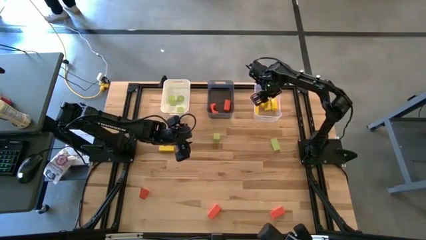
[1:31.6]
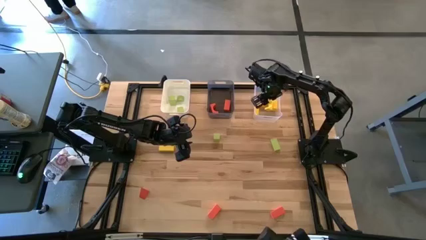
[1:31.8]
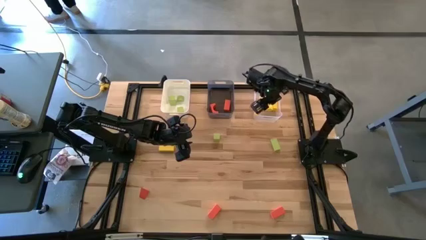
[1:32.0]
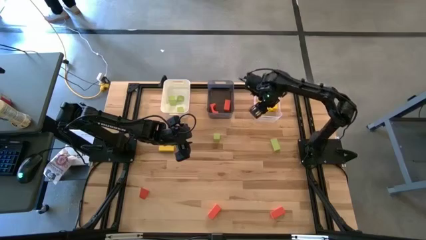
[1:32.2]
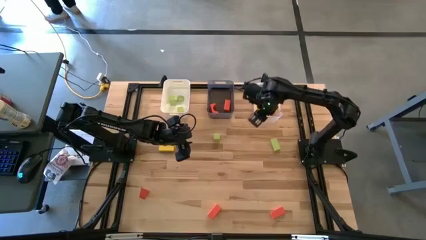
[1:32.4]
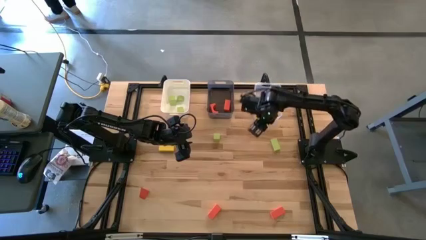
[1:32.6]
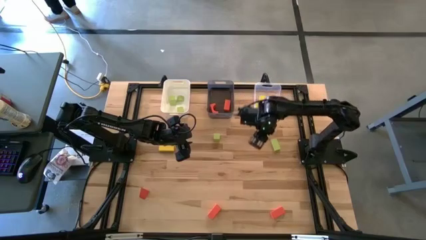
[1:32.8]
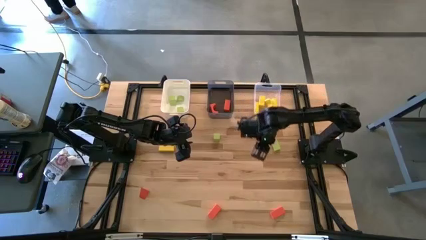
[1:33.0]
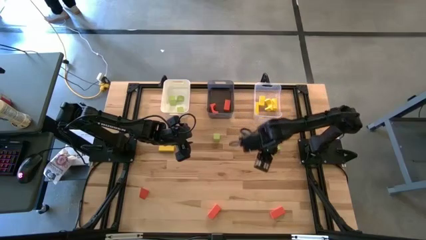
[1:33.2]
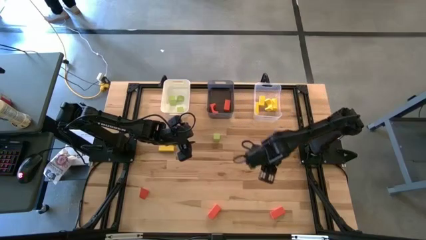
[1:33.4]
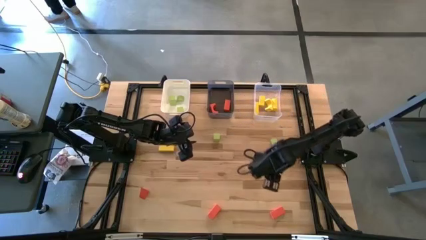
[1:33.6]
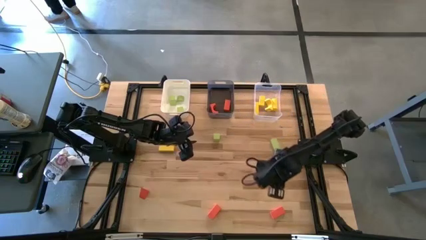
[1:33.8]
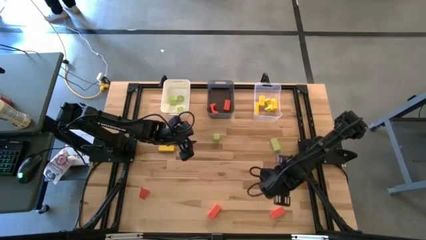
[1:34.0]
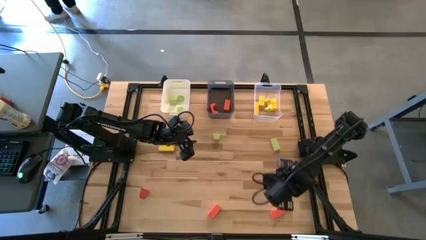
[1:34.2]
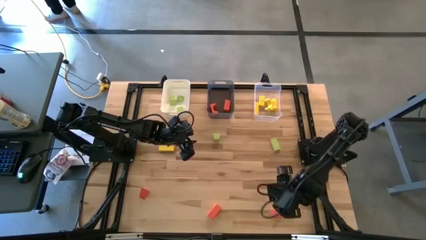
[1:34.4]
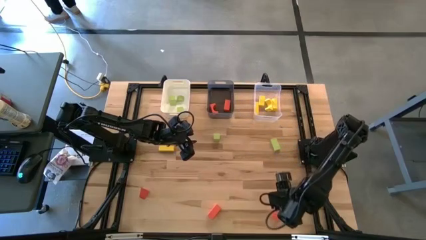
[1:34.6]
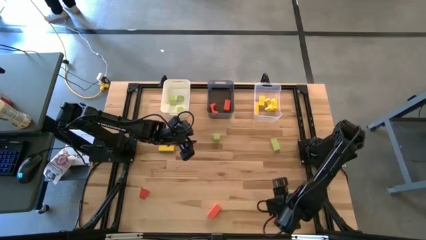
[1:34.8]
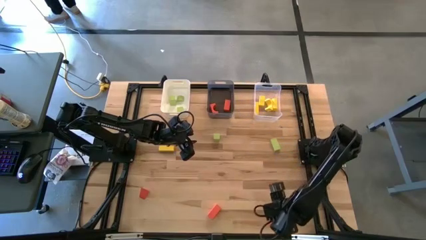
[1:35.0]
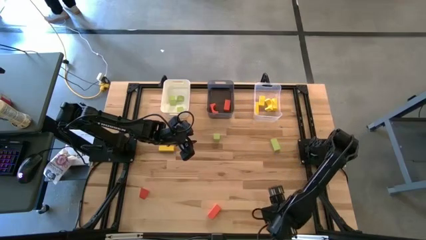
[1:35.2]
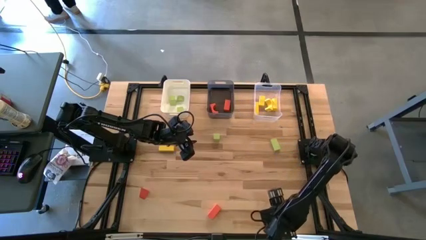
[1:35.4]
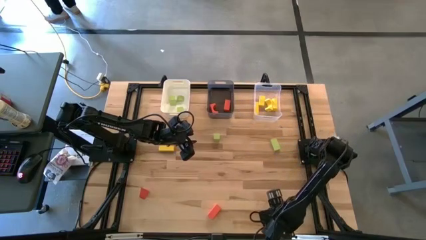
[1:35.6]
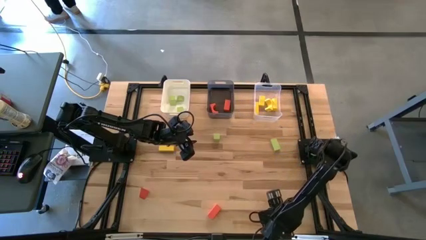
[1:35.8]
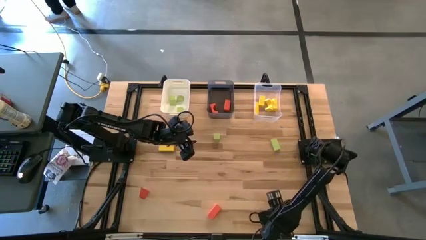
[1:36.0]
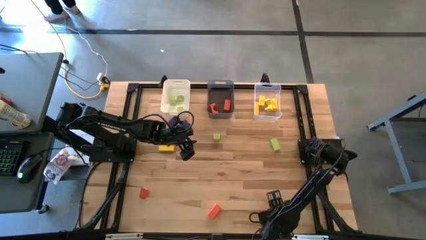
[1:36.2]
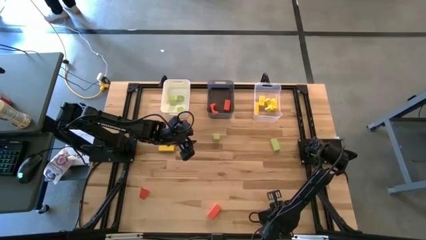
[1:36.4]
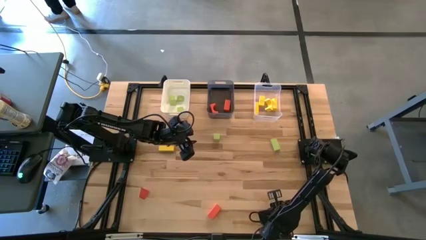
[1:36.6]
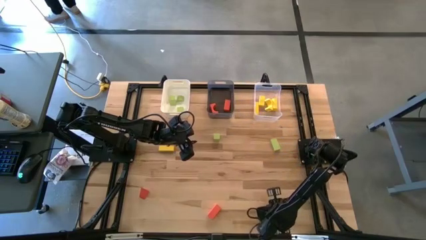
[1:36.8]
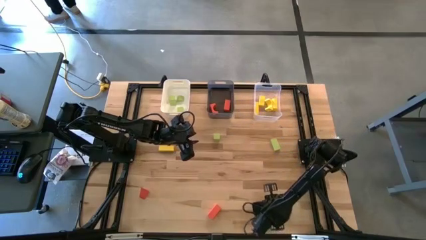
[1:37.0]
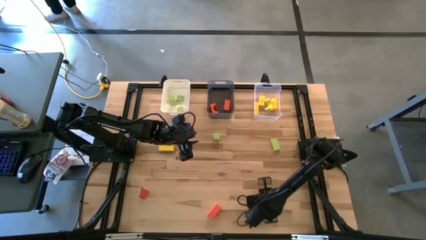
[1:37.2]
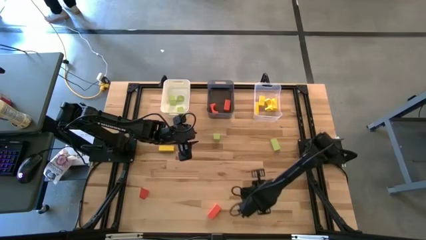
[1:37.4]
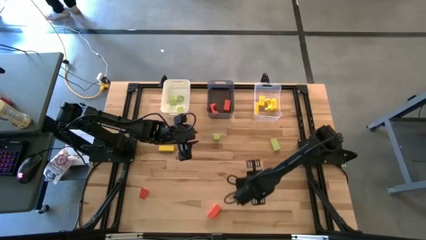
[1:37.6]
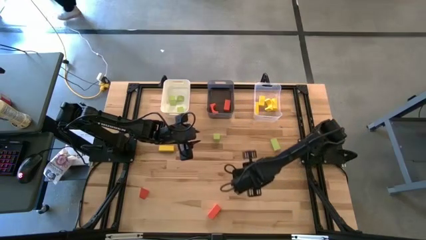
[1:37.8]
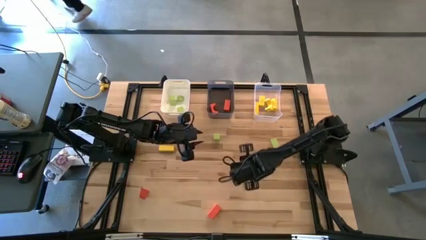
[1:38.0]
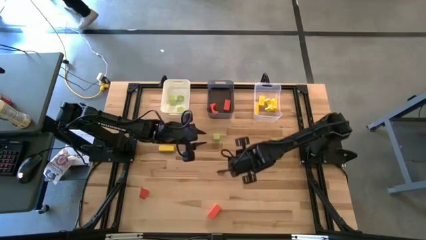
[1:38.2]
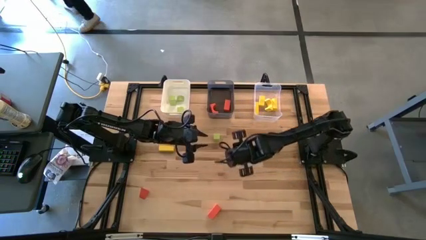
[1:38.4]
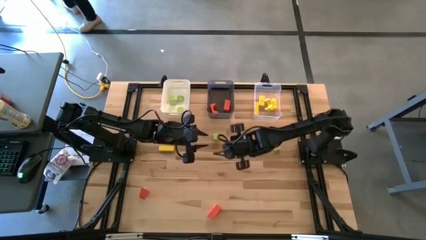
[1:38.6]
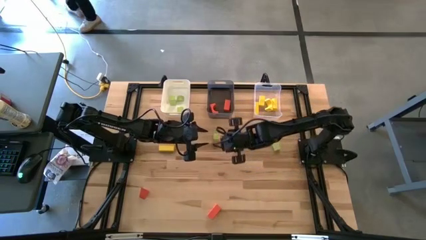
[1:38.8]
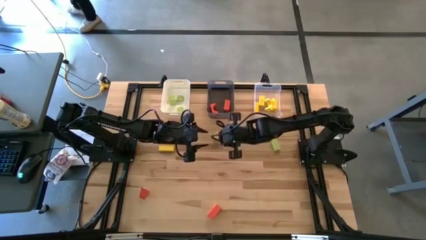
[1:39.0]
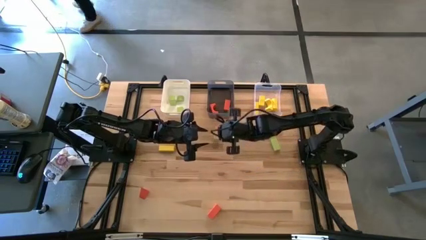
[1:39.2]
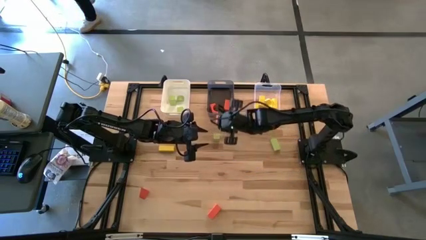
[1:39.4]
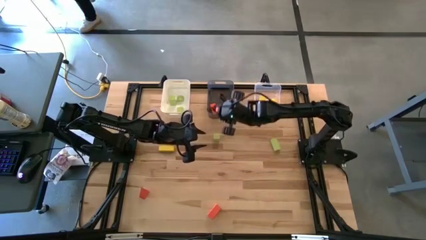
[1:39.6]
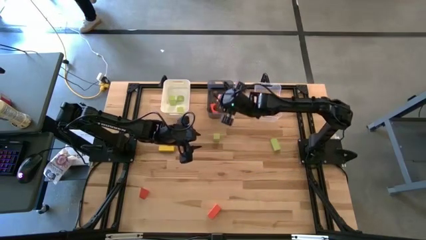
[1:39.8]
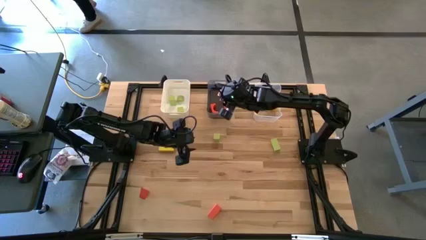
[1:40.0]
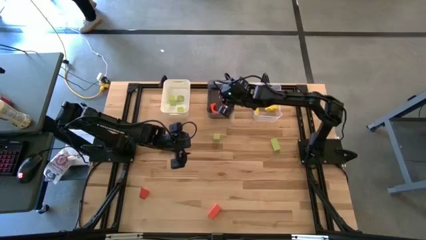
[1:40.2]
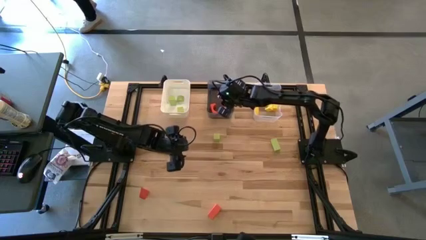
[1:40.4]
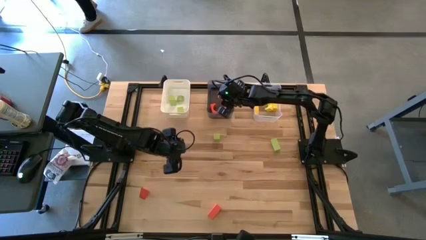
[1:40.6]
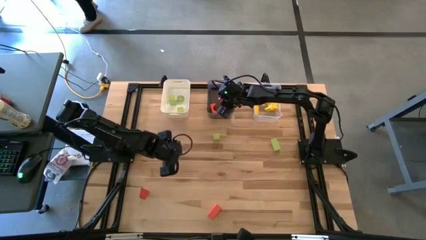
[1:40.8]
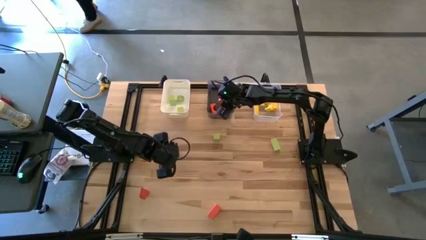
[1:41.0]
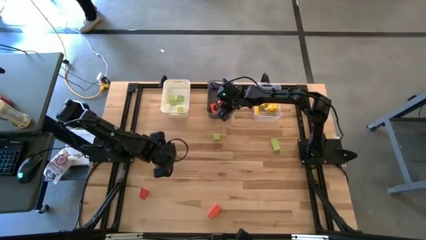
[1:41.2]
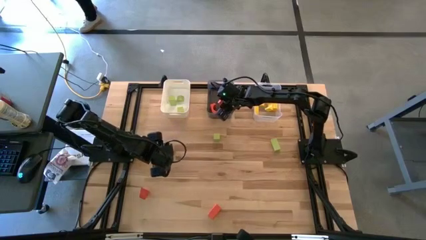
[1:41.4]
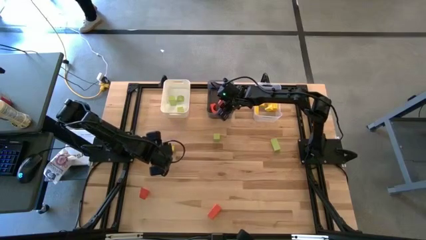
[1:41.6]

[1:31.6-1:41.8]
Task: Sort & place blocks by color
Put the orange block into the black bin

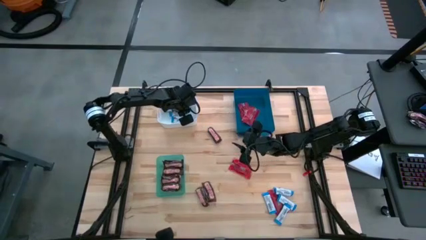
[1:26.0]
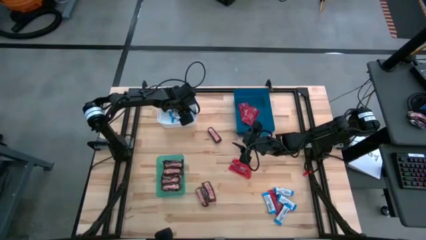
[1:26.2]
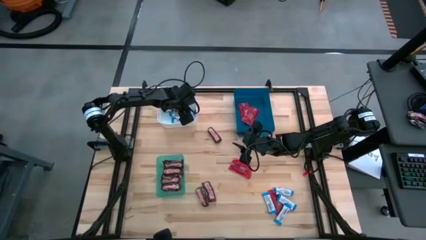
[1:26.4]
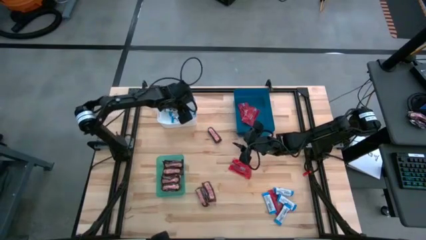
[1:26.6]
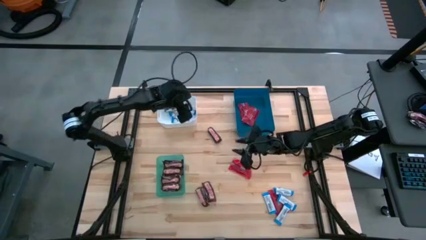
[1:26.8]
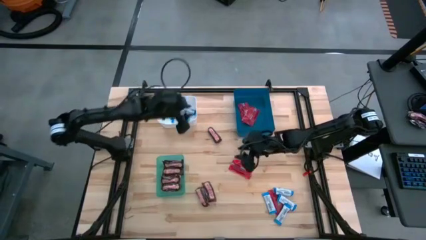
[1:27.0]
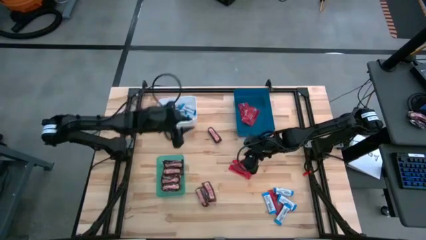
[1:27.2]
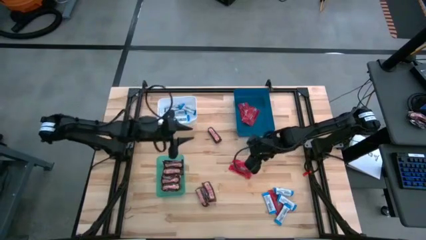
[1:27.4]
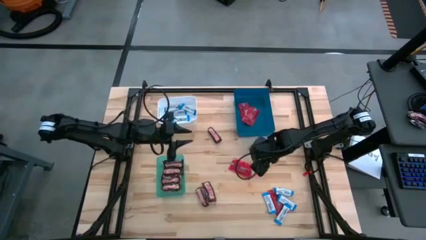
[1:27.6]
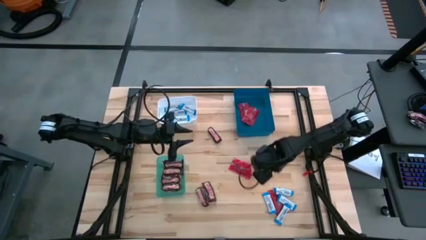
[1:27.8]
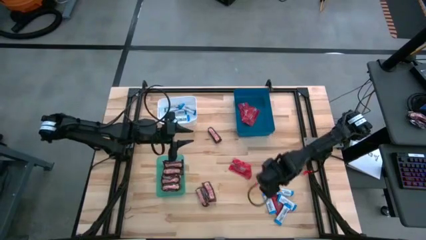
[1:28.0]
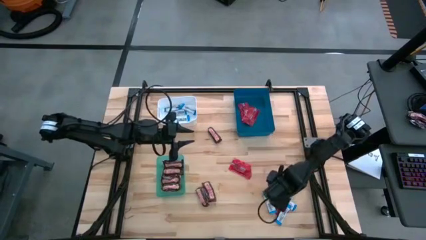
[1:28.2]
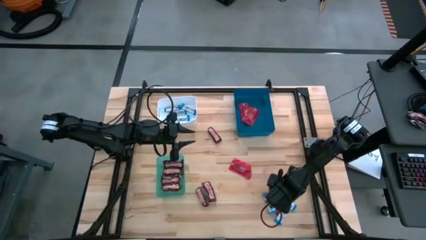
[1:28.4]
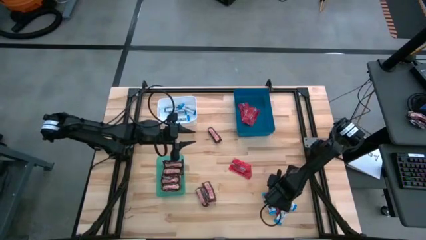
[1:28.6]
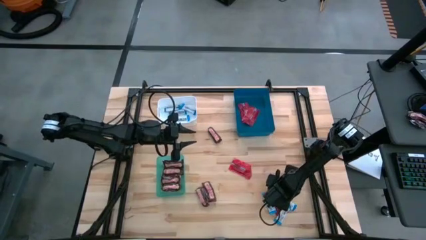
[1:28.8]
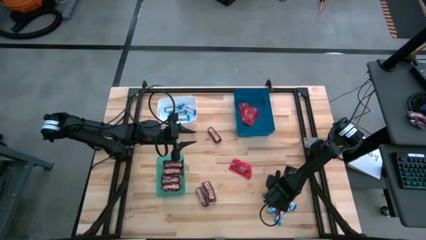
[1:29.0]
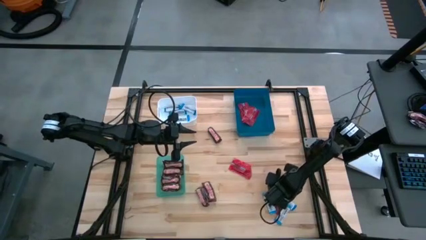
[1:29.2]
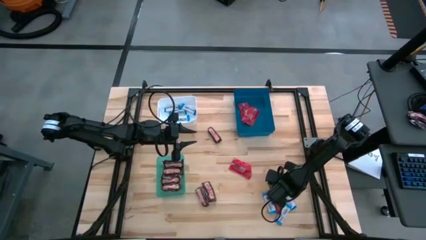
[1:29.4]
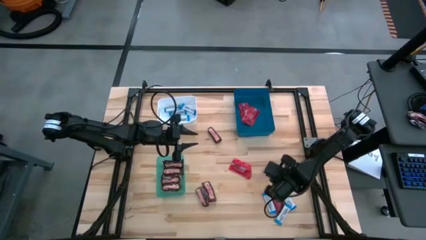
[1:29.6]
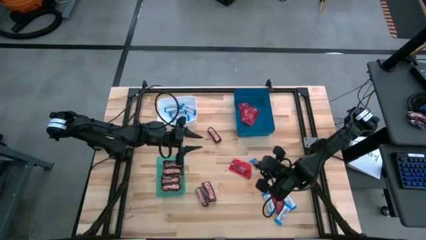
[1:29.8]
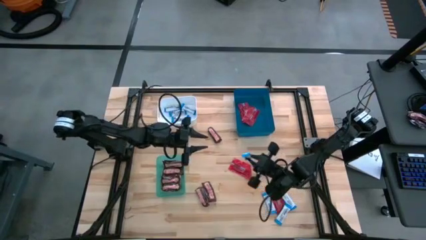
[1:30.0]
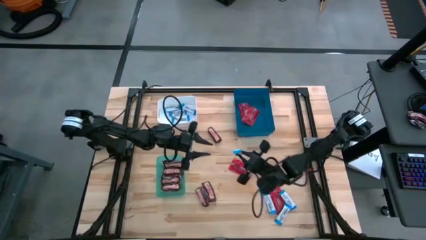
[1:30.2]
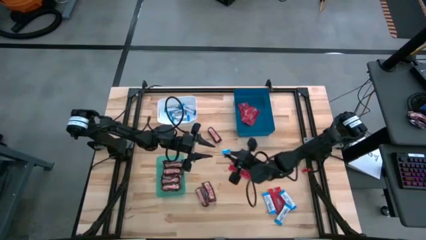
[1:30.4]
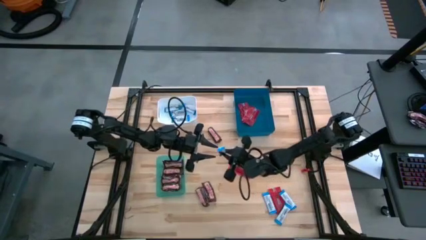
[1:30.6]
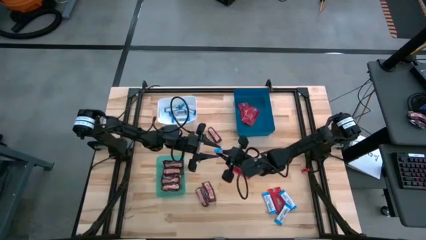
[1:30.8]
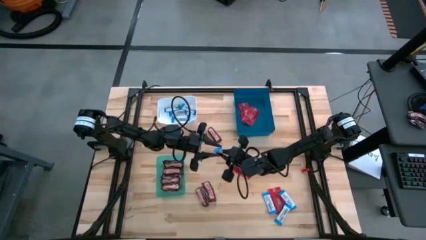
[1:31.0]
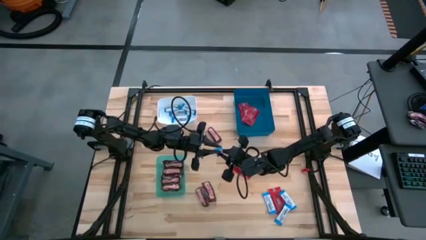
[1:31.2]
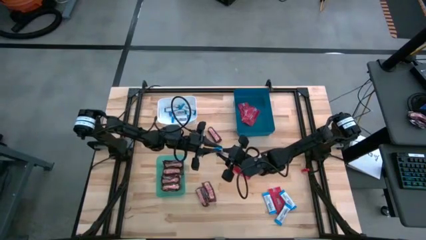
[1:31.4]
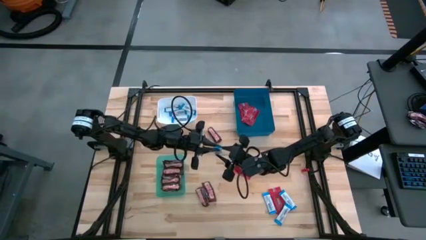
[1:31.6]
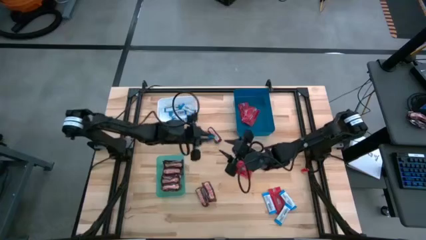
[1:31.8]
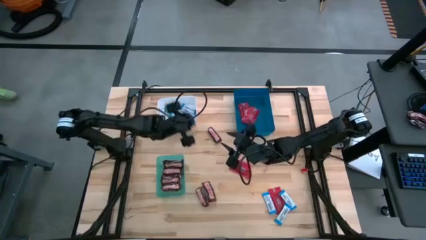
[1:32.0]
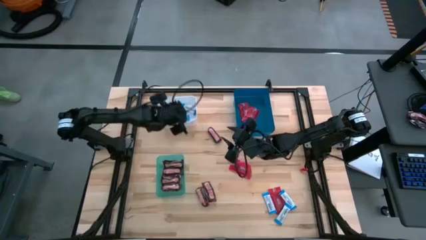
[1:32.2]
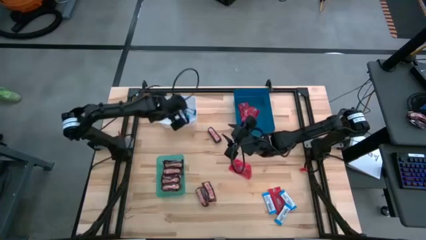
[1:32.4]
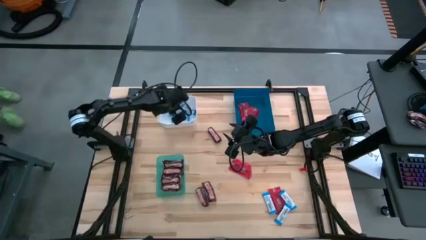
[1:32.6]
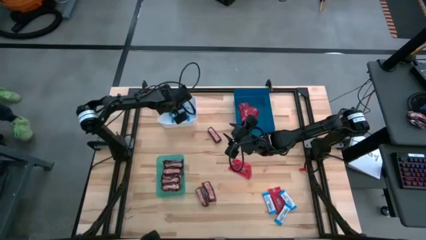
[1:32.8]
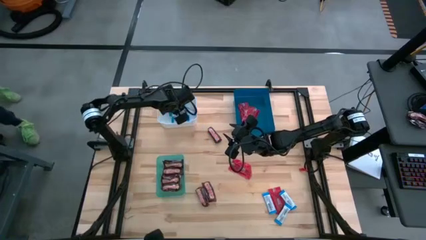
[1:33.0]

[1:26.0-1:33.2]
Task: Sort candy
Put the white chocolate bar into the white bin
